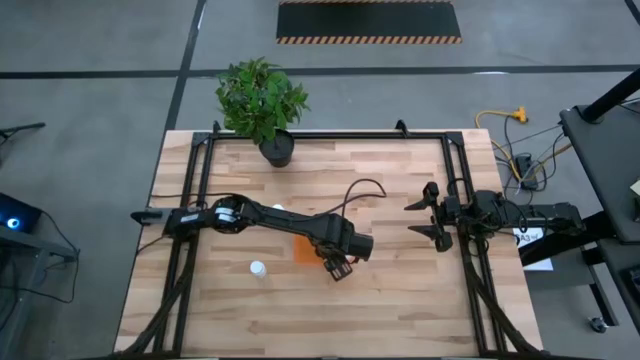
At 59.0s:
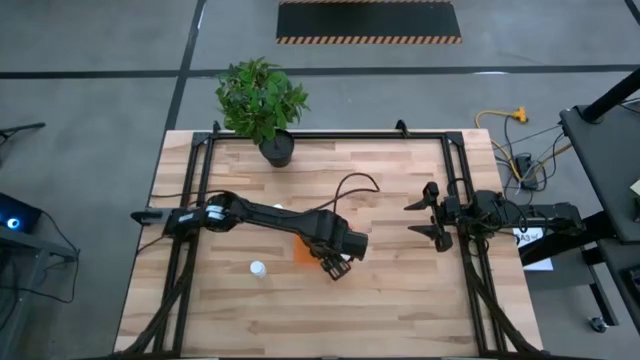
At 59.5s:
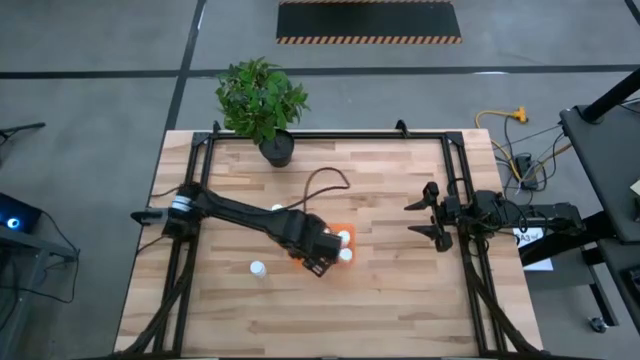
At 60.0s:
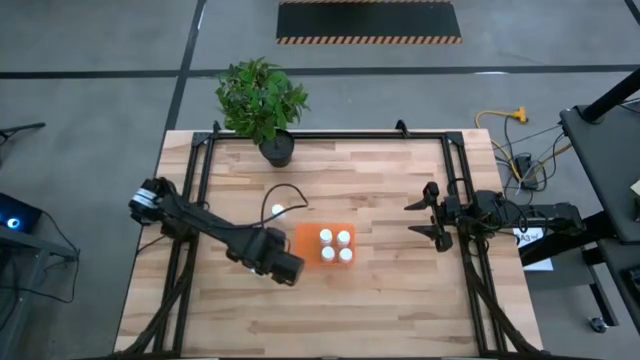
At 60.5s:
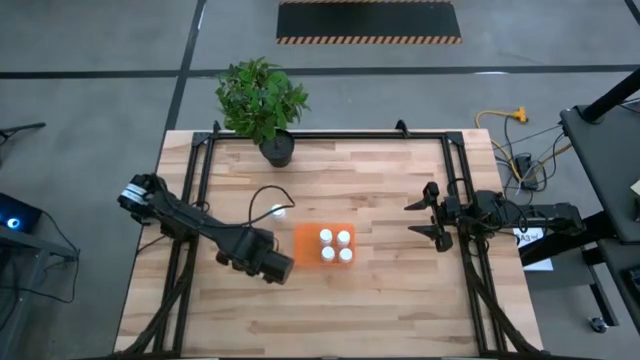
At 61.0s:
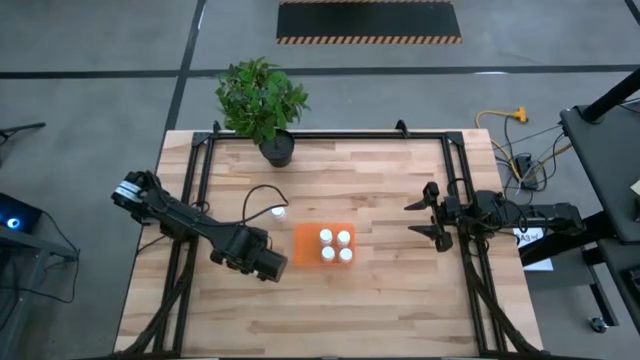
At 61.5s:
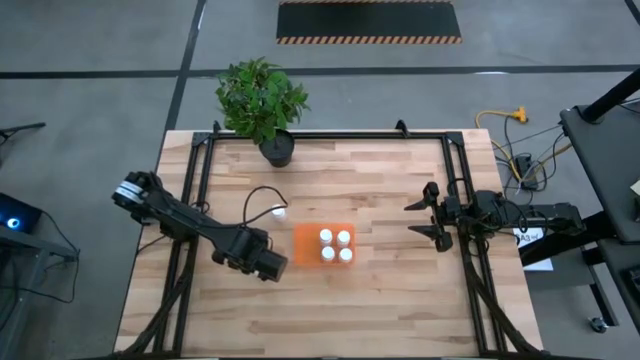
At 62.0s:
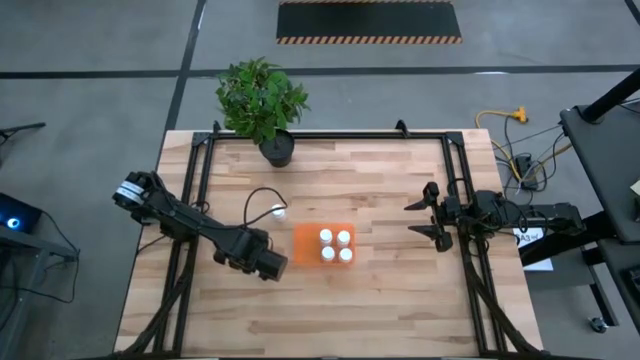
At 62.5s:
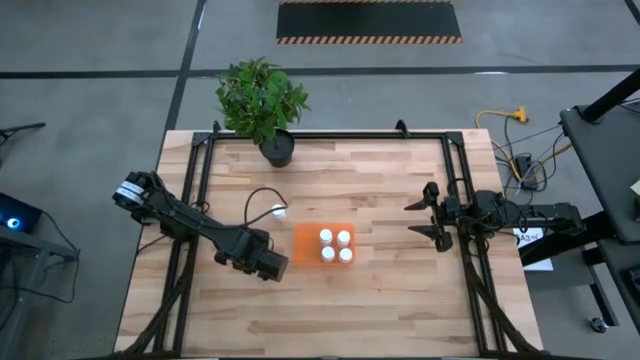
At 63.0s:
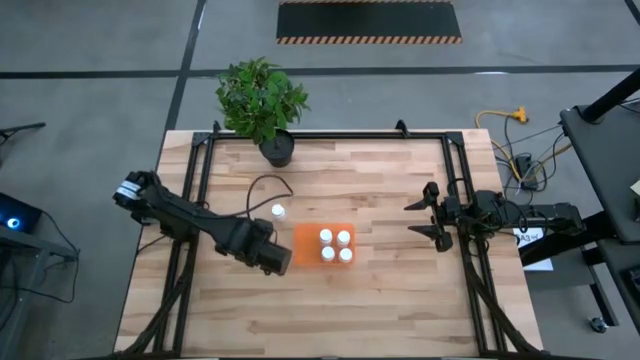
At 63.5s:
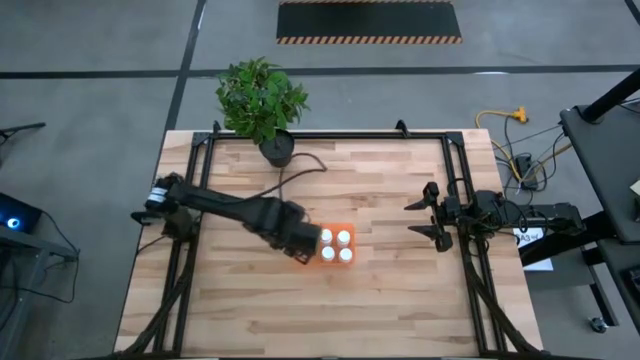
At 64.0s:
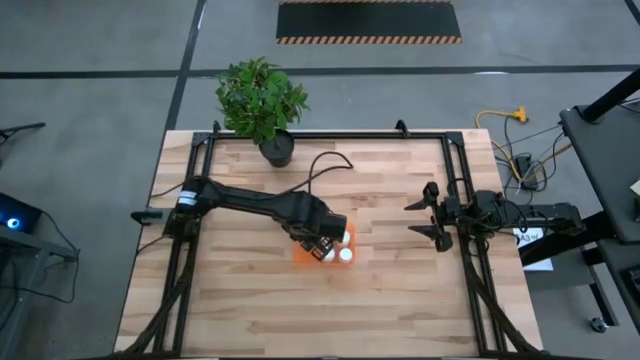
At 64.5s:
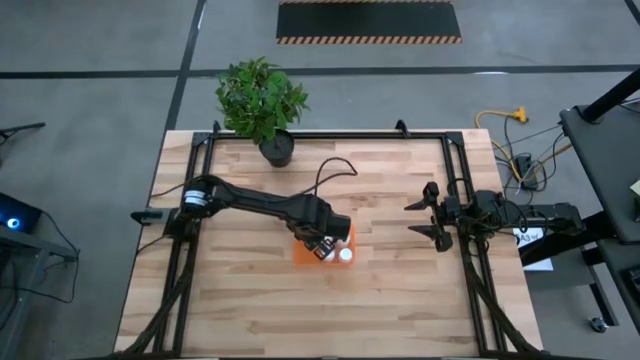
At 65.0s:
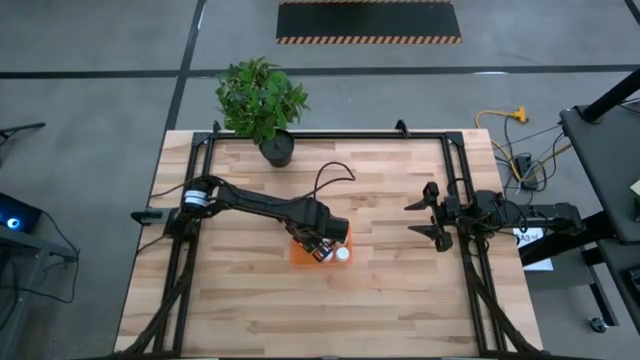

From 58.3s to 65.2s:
Task: Pick and place pill bottles into a basket
Put the white pill bottle into the orange bin

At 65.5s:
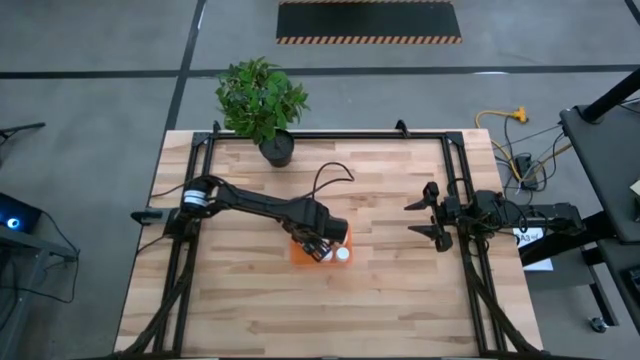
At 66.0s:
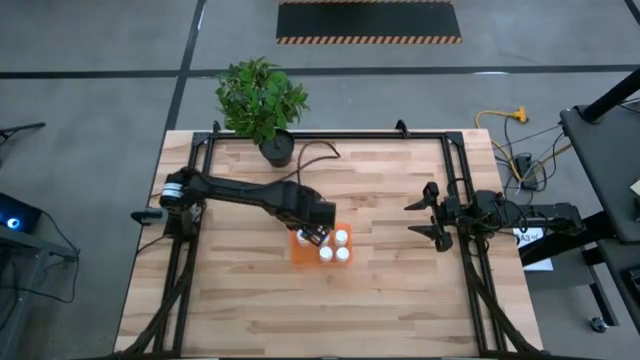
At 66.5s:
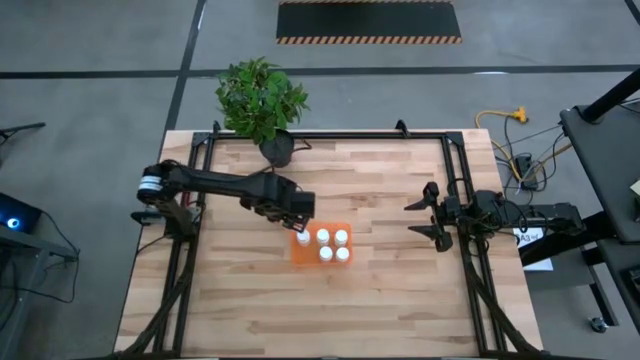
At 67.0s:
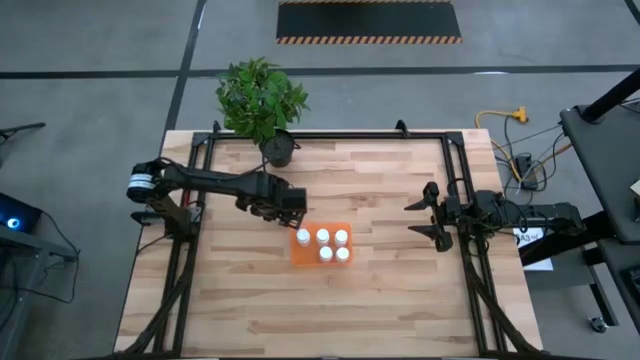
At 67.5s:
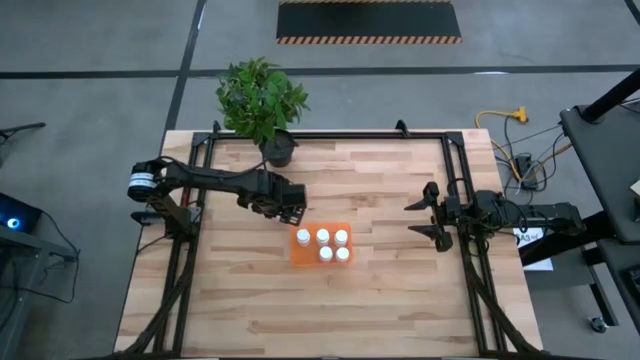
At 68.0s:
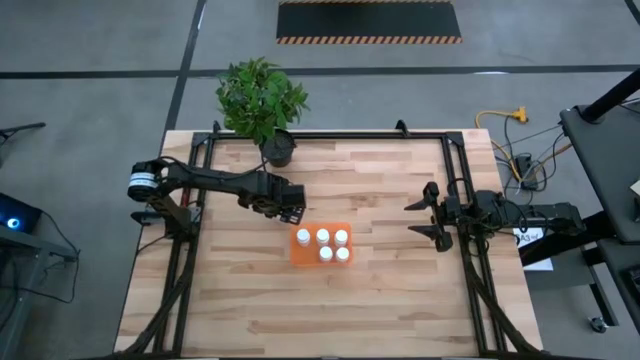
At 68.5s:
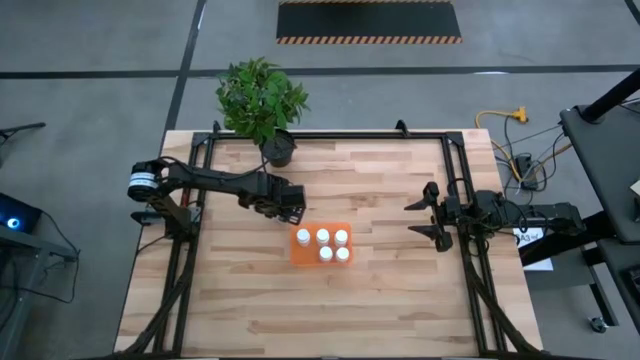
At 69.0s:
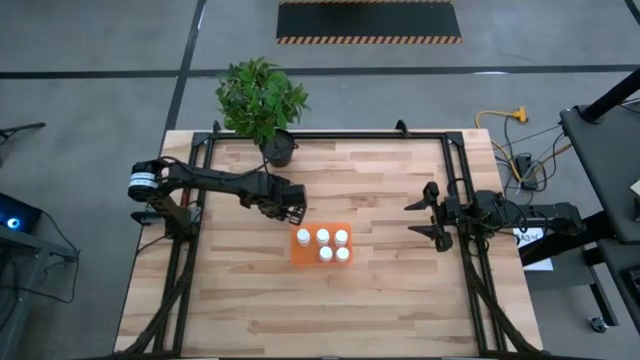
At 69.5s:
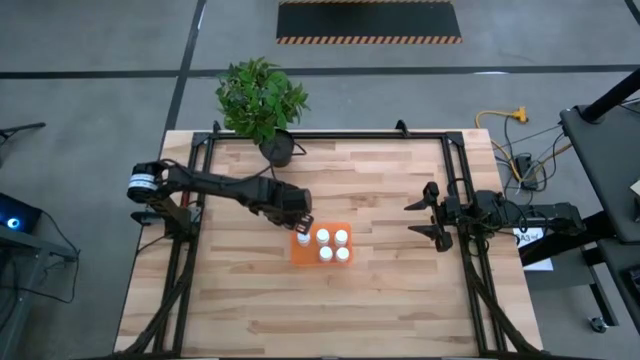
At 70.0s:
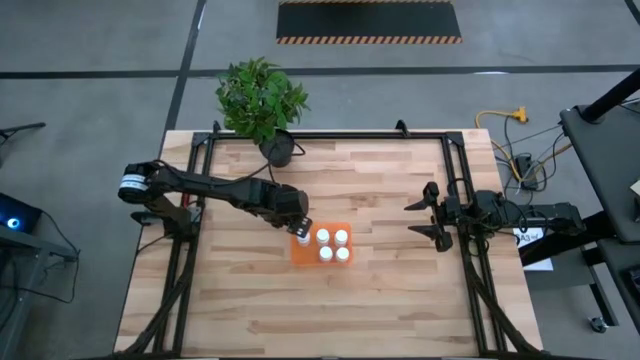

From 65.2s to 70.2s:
Put the white pill bottle into the orange bin

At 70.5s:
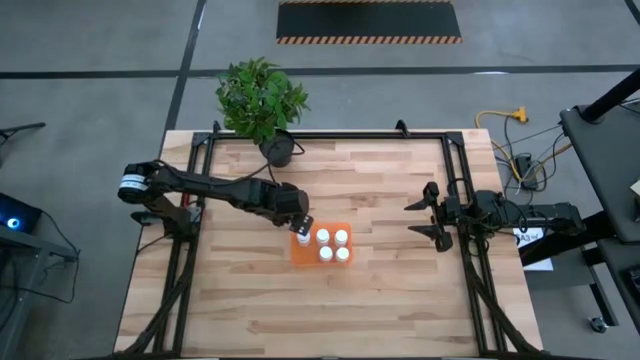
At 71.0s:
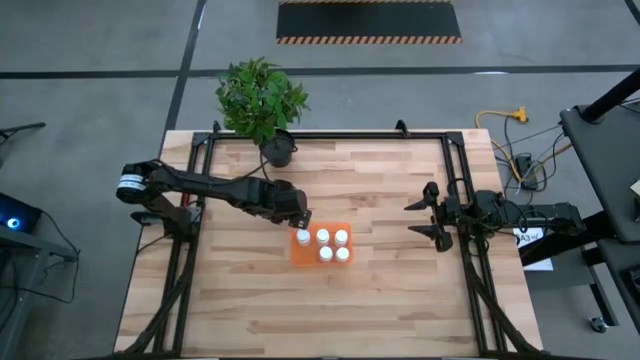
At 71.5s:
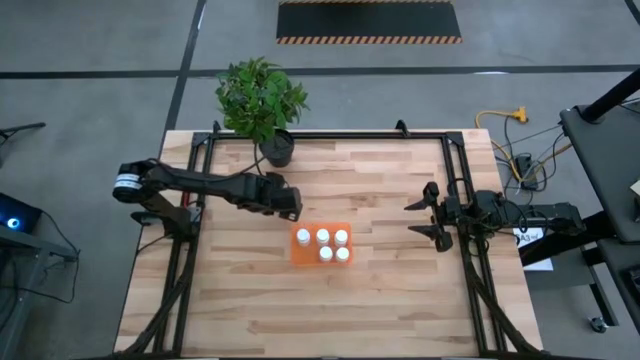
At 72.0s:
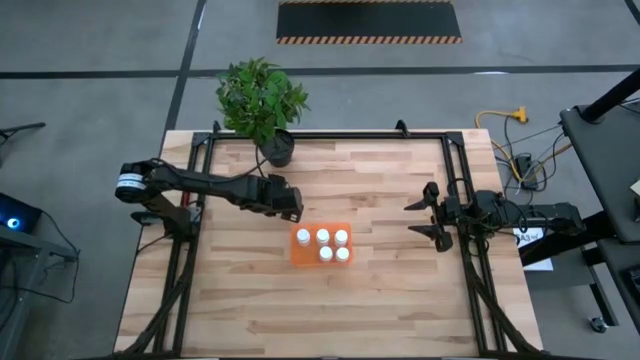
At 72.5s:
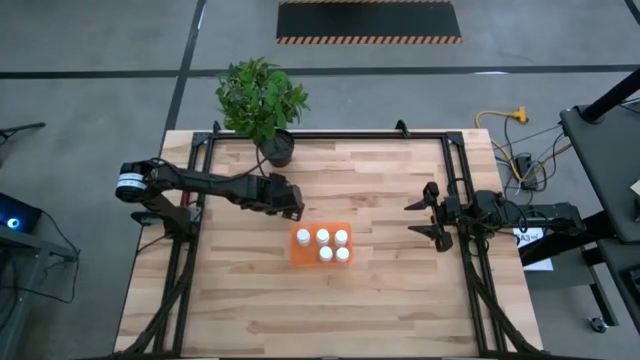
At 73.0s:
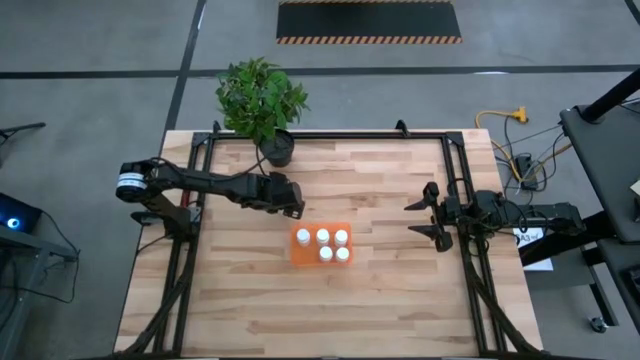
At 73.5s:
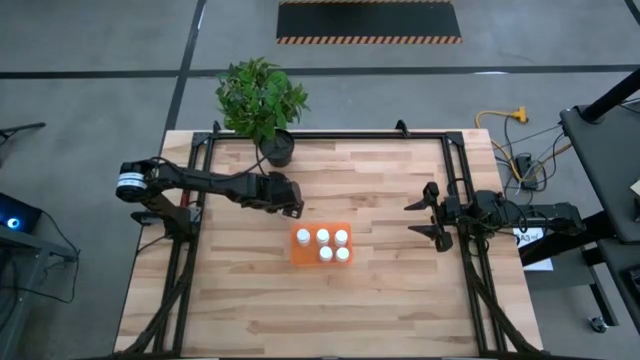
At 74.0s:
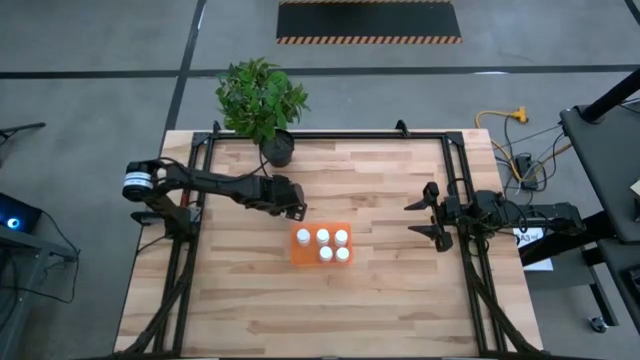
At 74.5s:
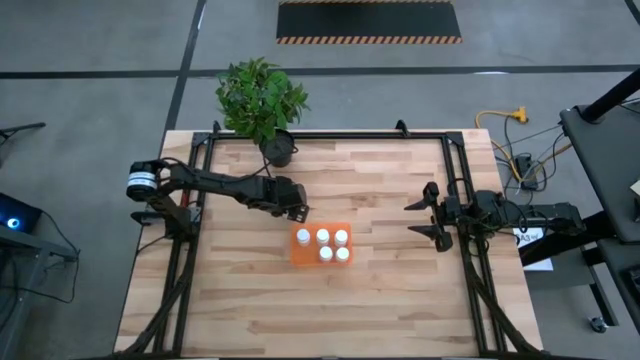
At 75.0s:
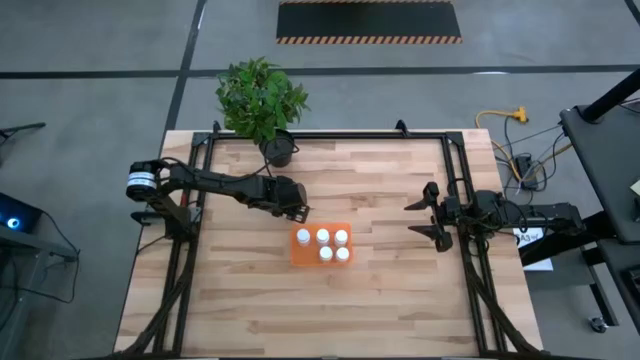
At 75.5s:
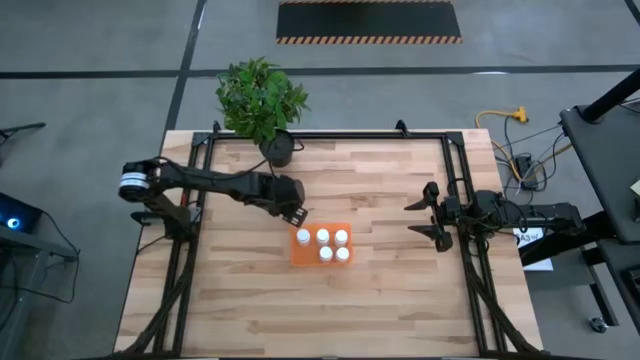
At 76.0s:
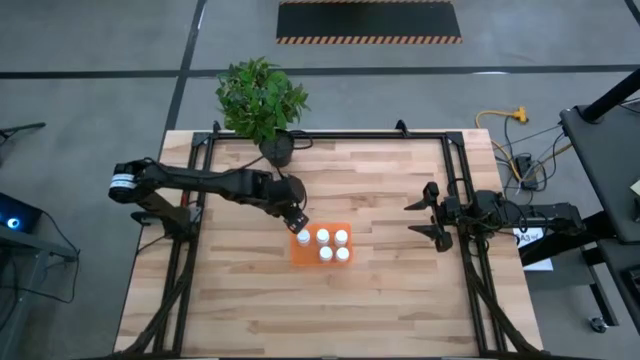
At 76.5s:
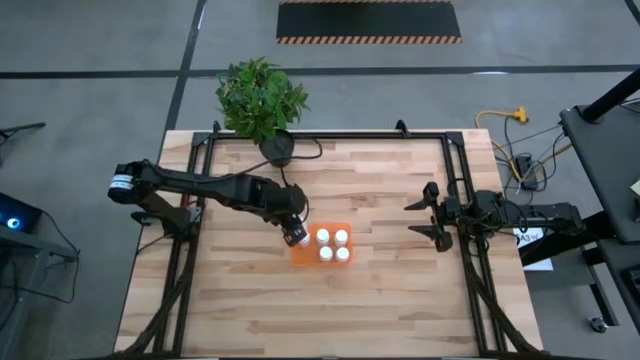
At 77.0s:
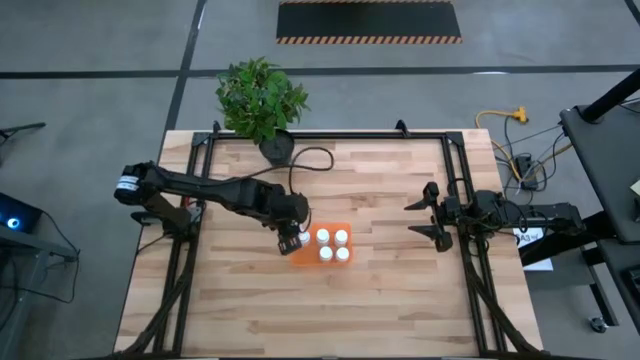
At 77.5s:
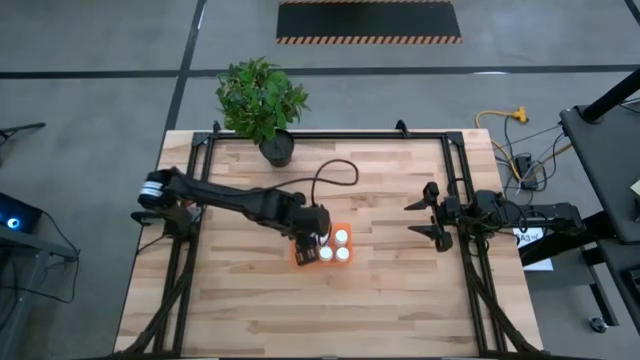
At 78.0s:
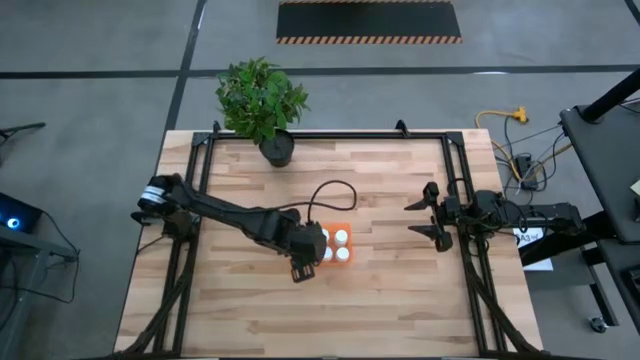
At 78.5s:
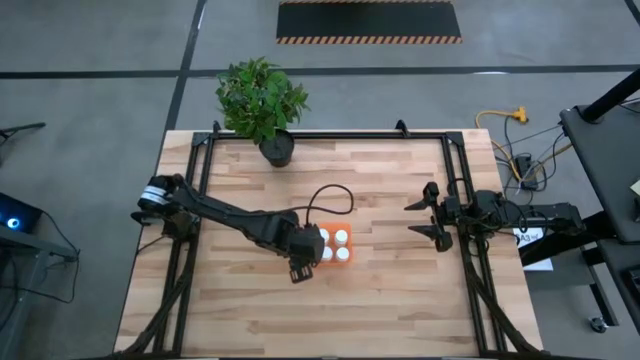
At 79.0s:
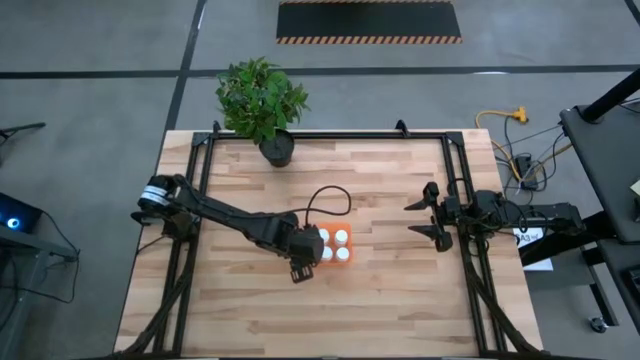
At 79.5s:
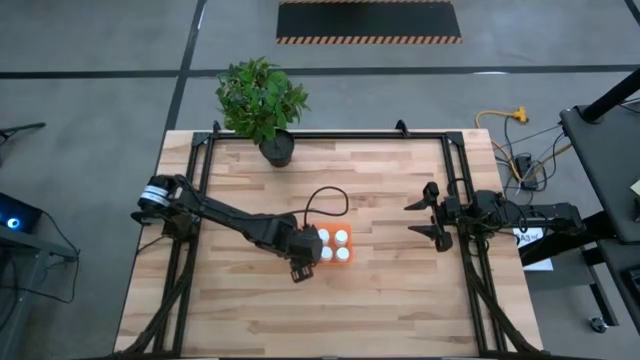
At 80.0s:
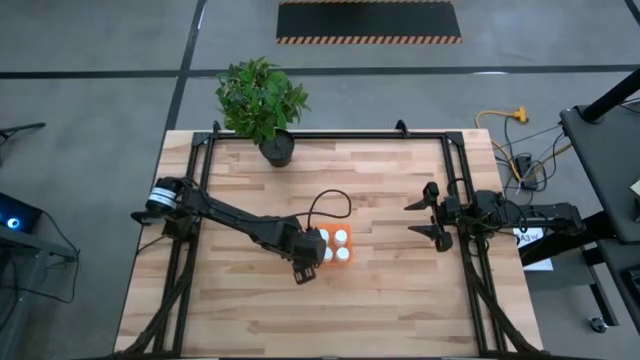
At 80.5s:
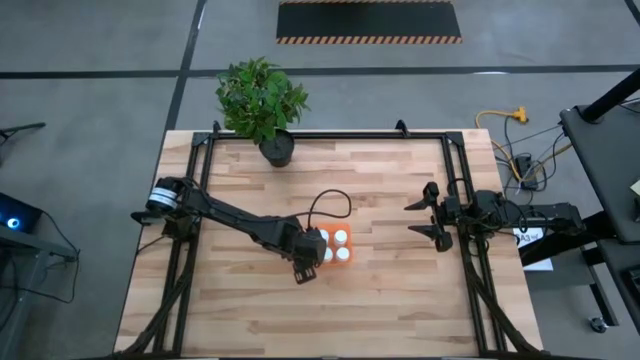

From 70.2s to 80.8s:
Put the white pill bottle into the orange bin
